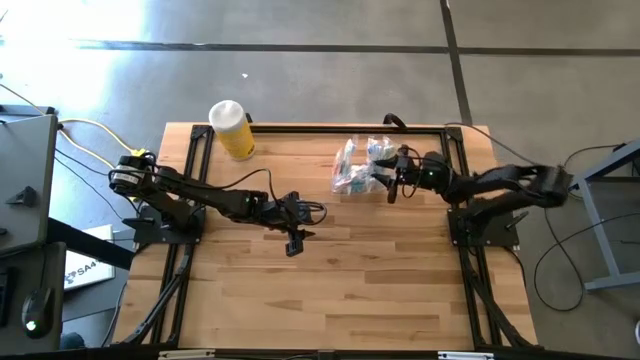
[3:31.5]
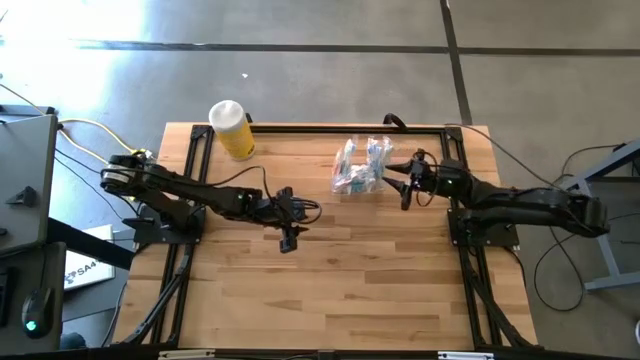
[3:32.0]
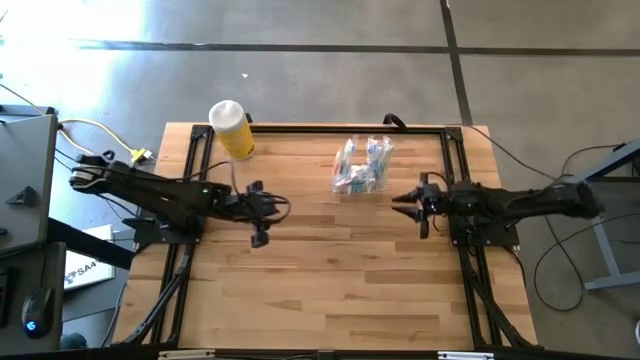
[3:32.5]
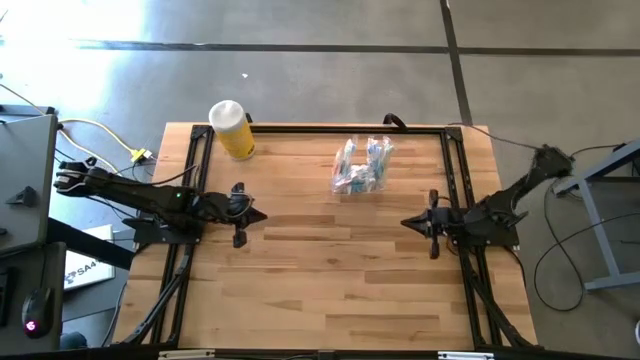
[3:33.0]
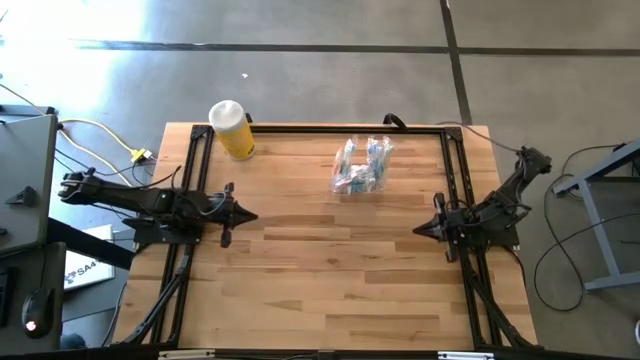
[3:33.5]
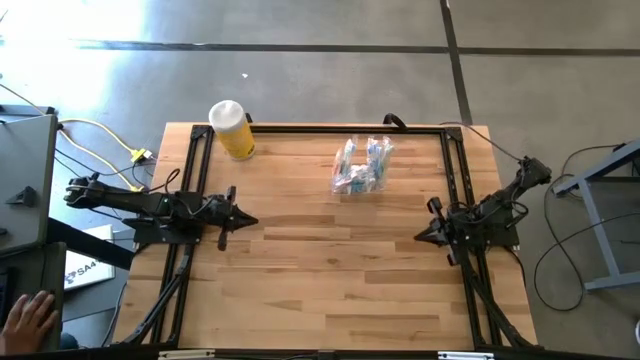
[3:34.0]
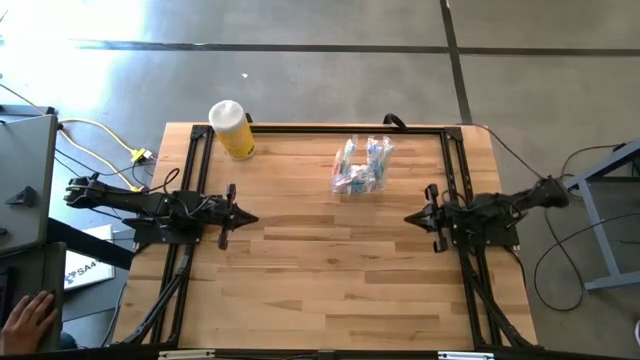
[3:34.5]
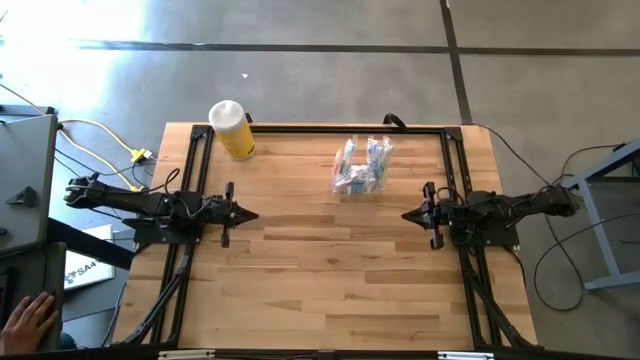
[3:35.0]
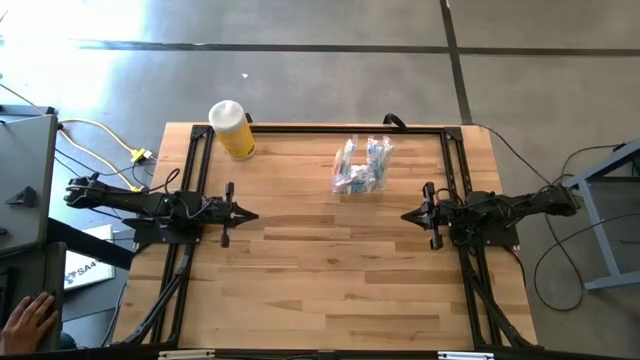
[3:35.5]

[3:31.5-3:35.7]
Task: Pick & Place toothbrushing station
Return to Home Position

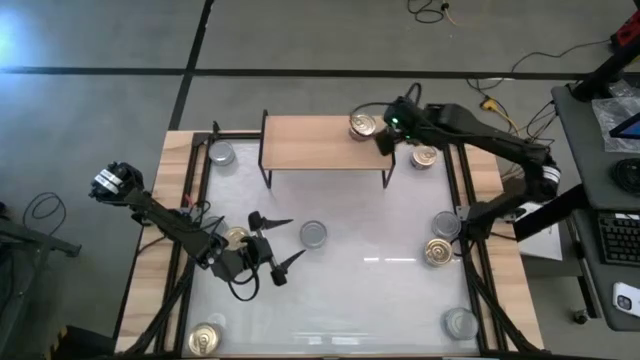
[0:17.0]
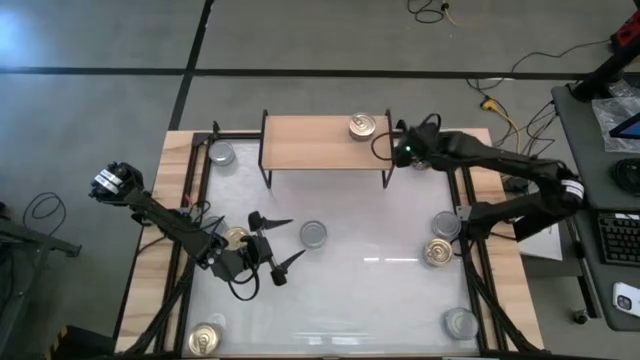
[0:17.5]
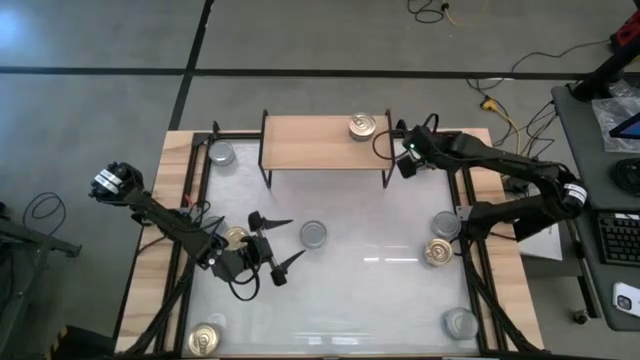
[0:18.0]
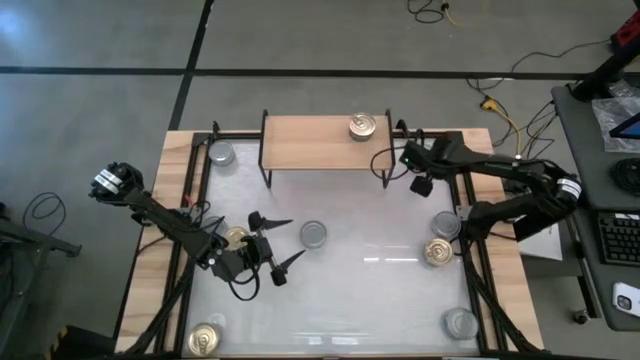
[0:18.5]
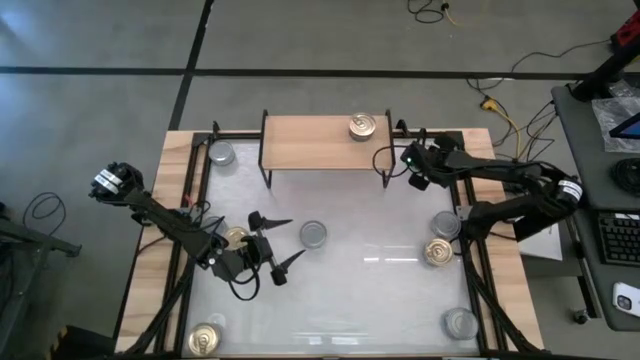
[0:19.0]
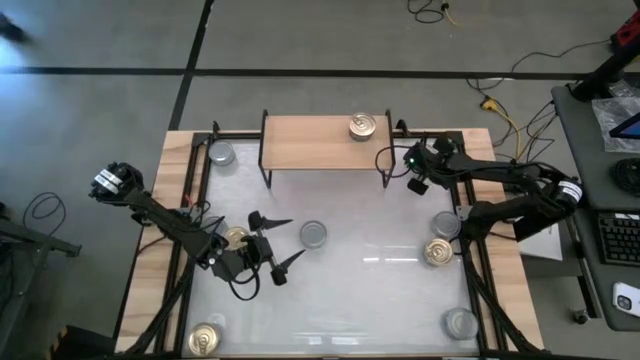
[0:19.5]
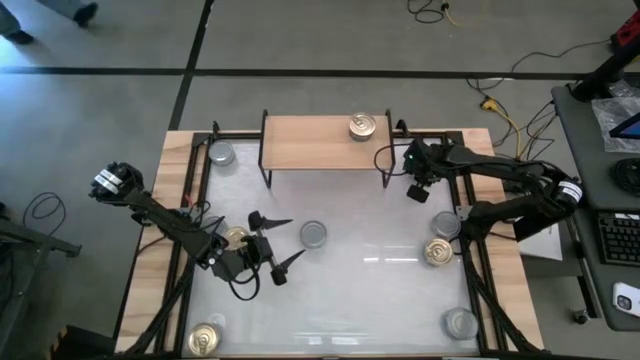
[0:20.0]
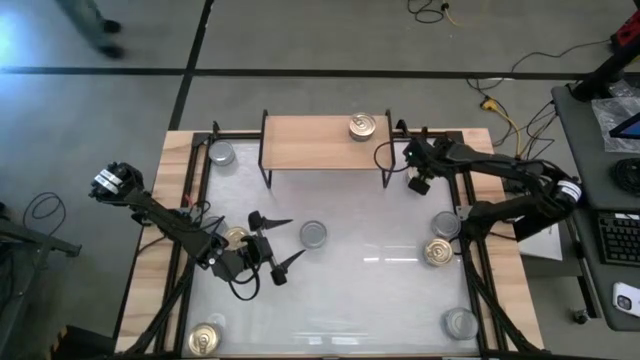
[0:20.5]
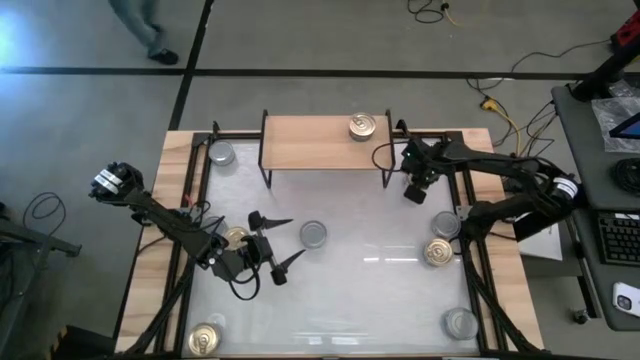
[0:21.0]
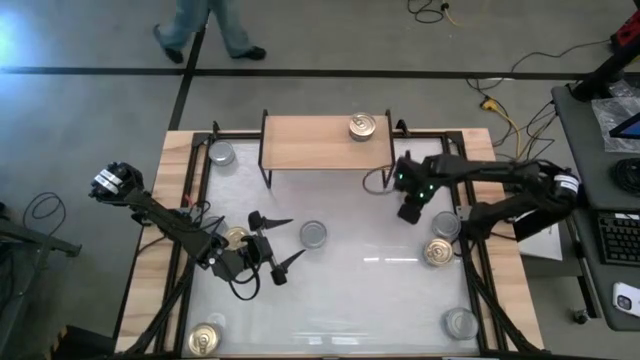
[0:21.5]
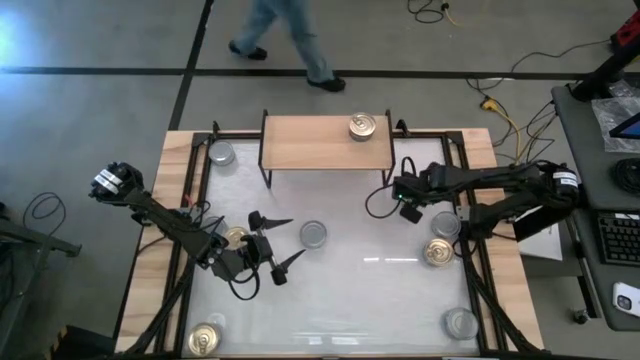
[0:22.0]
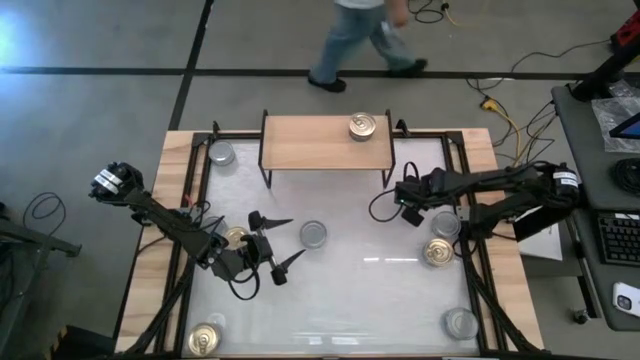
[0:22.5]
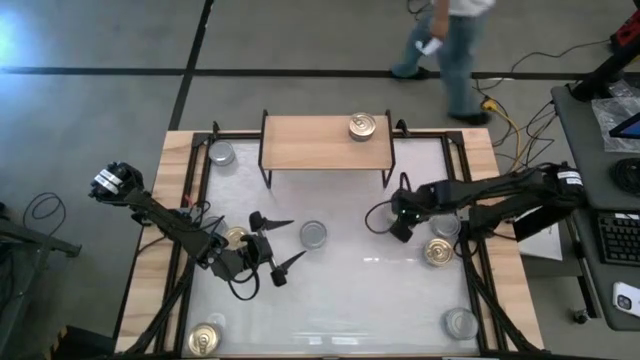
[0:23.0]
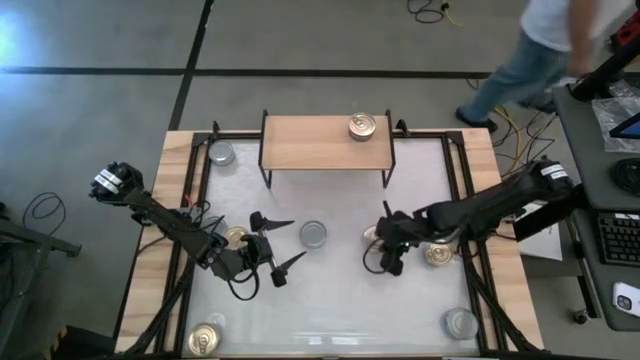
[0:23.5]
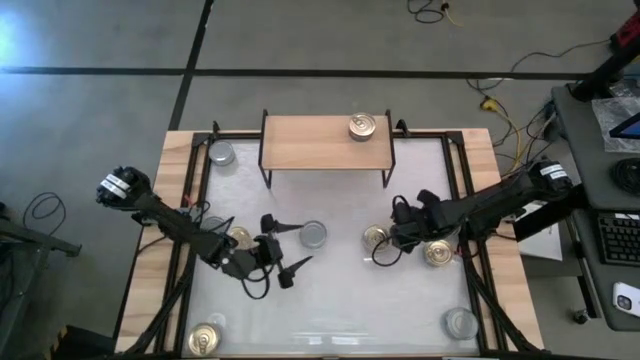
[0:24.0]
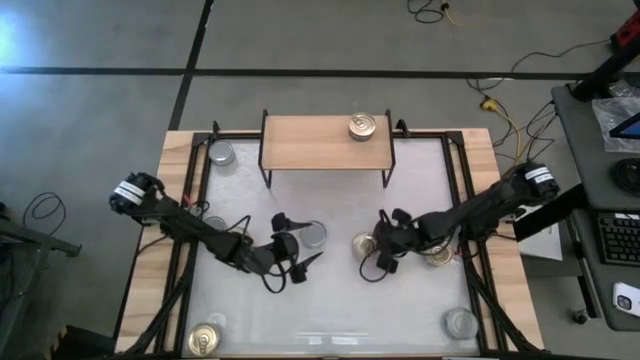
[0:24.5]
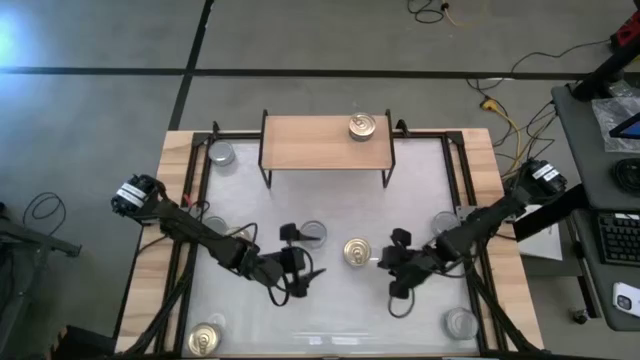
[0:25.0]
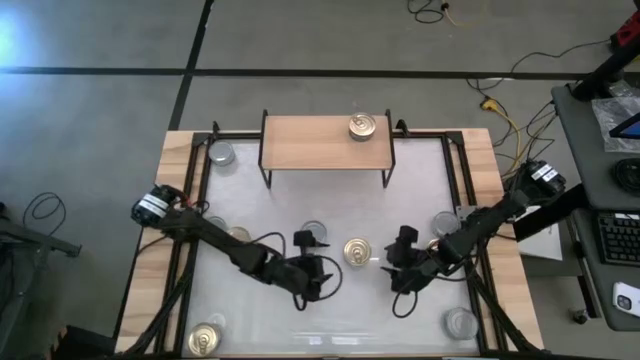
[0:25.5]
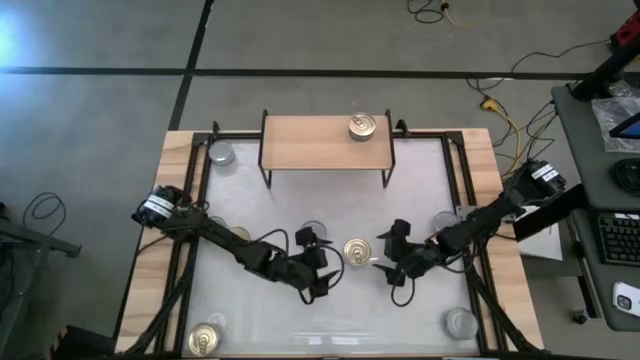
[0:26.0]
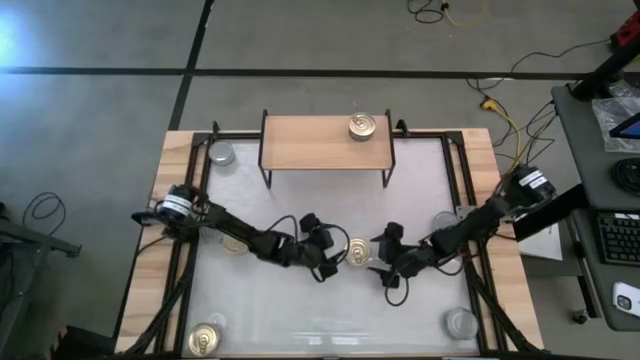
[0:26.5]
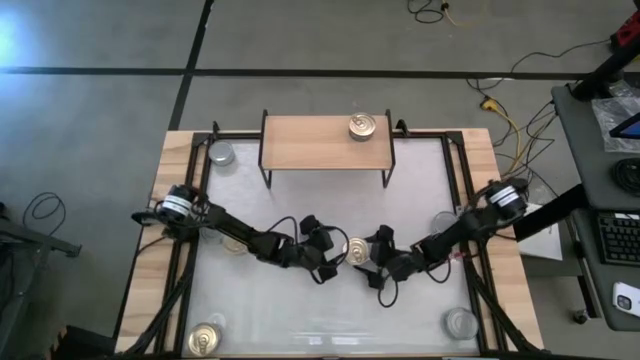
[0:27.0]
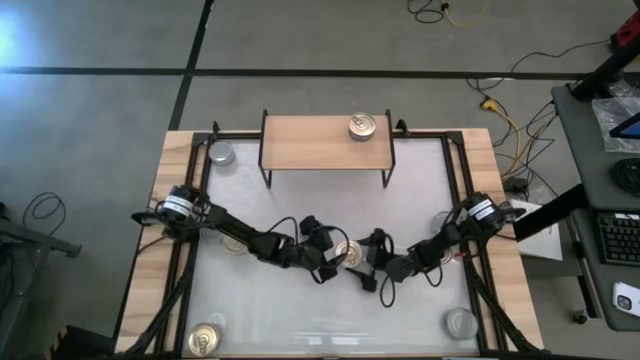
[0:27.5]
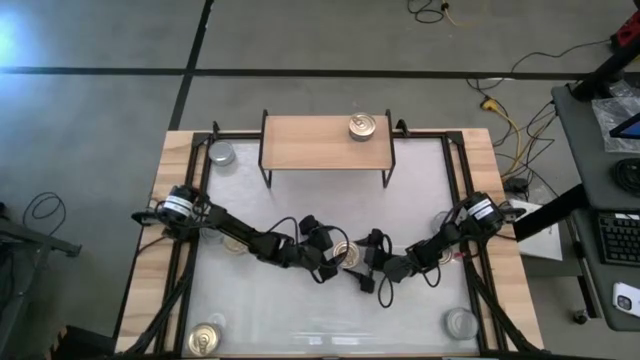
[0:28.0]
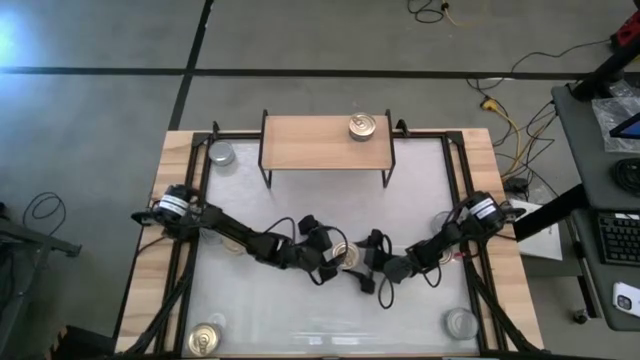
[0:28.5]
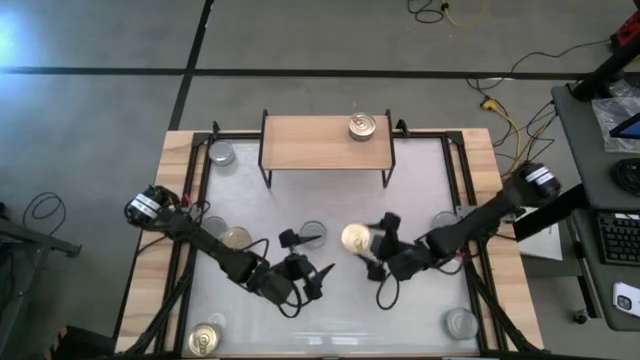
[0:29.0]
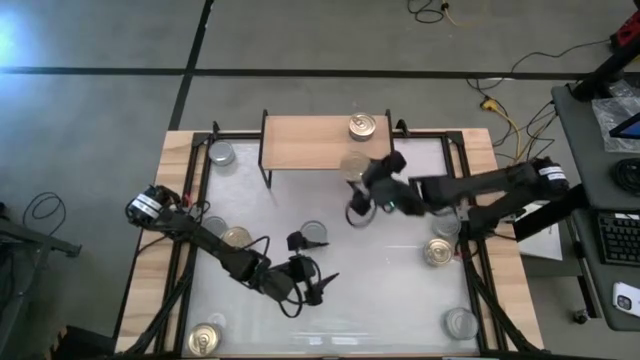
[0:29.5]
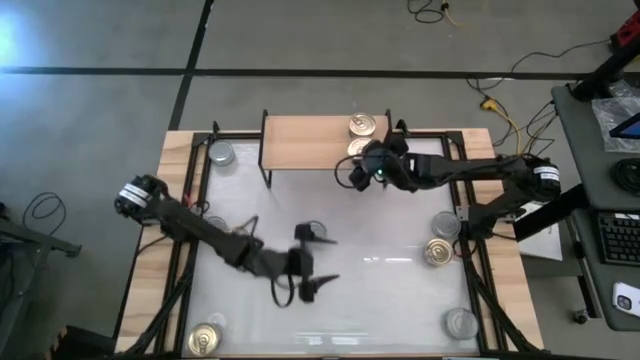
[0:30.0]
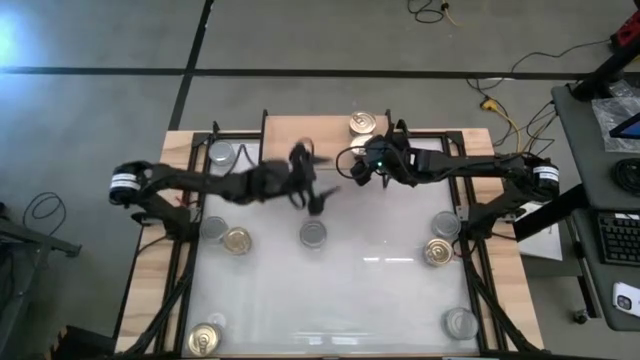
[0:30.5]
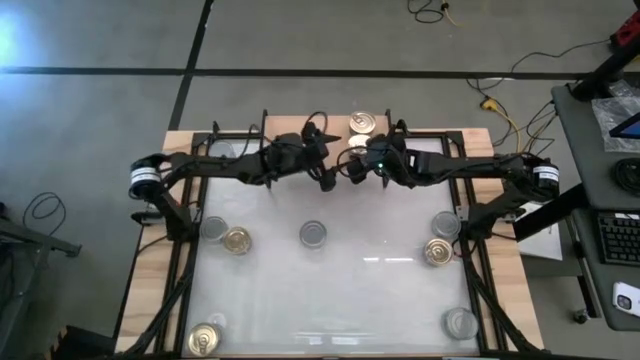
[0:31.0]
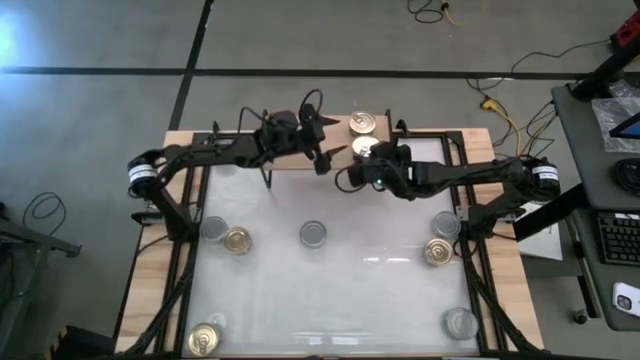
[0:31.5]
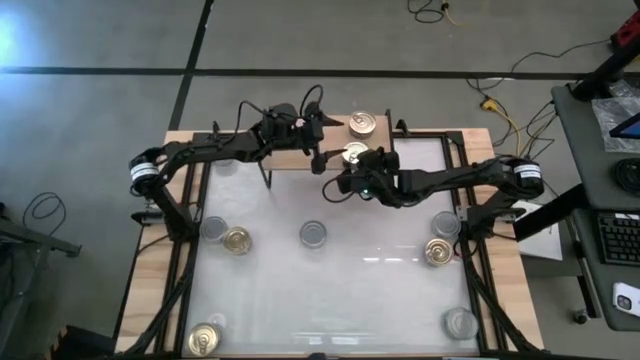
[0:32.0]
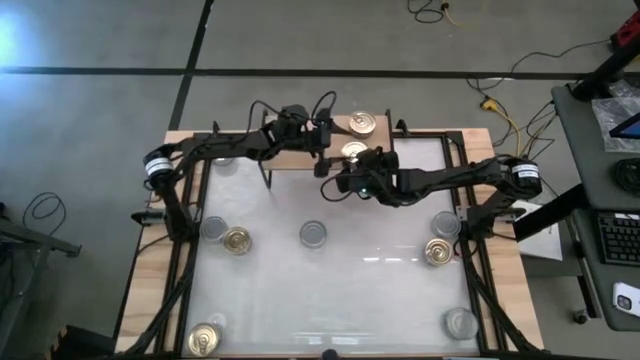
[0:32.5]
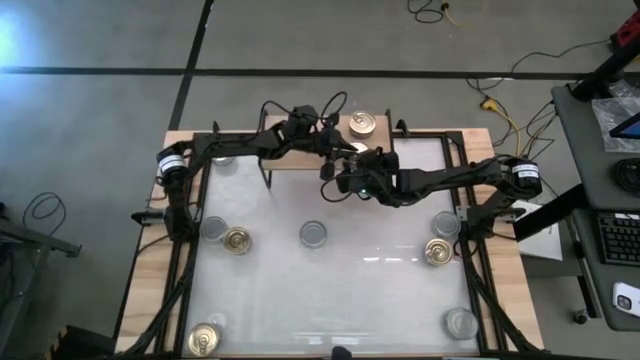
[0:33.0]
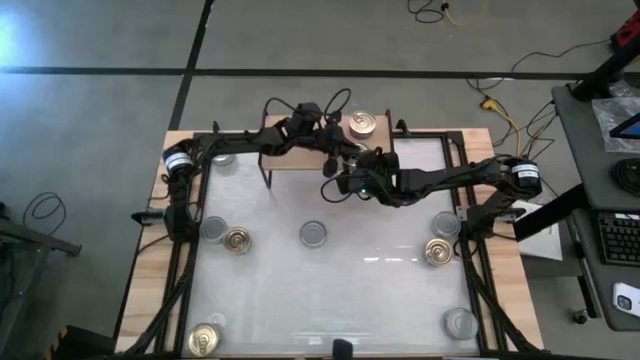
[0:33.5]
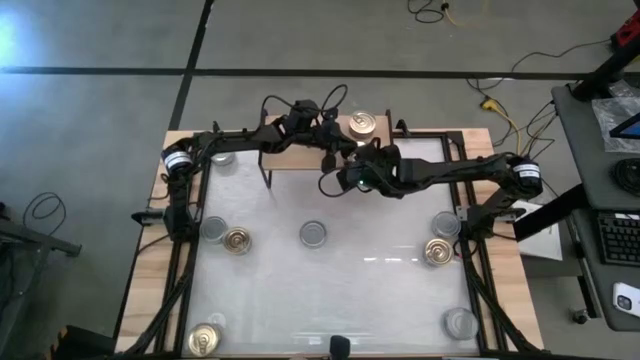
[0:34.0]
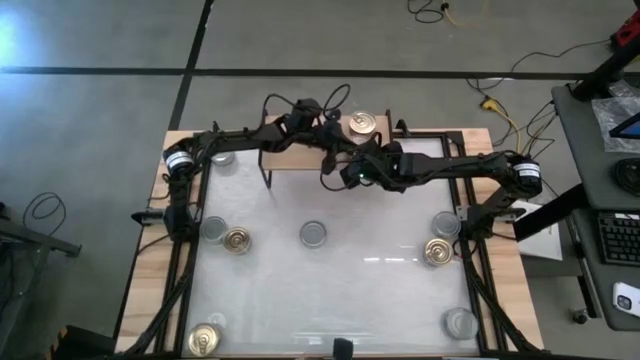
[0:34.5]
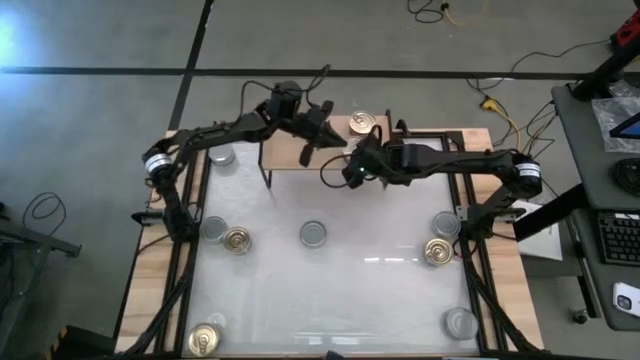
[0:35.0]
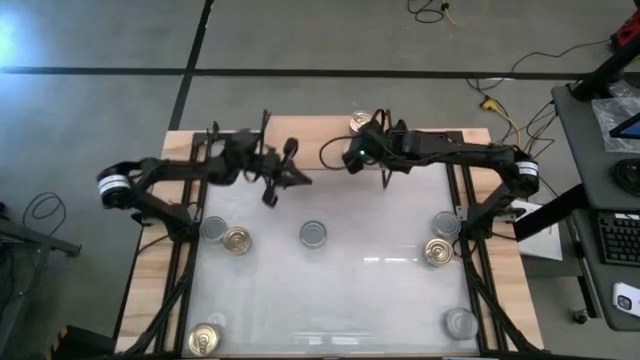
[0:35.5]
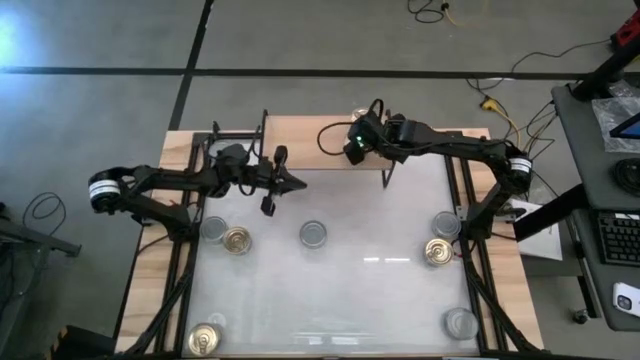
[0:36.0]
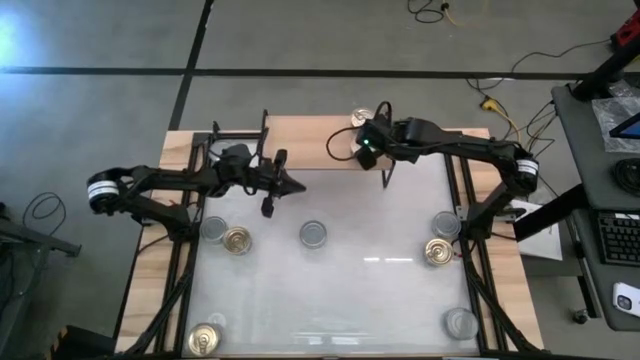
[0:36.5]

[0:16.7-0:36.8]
Task: Stack canned seafood by type on shelf
Put the blue tuna can on the shelf
